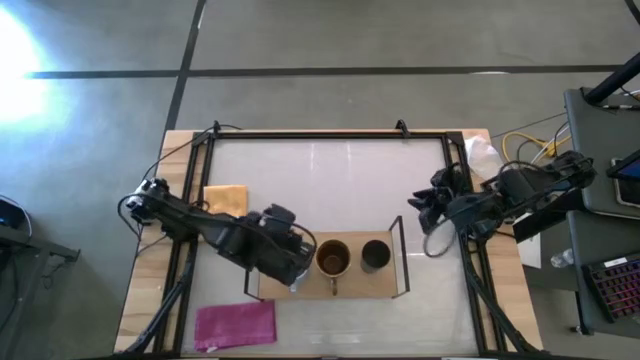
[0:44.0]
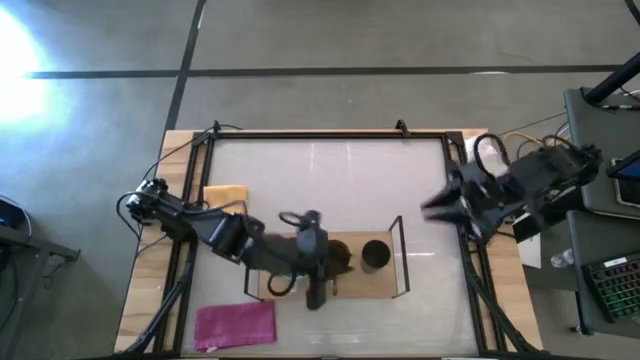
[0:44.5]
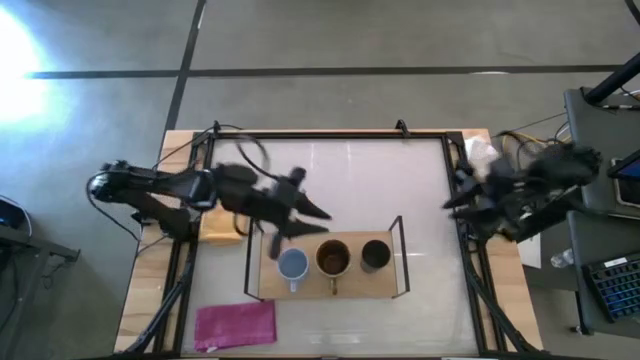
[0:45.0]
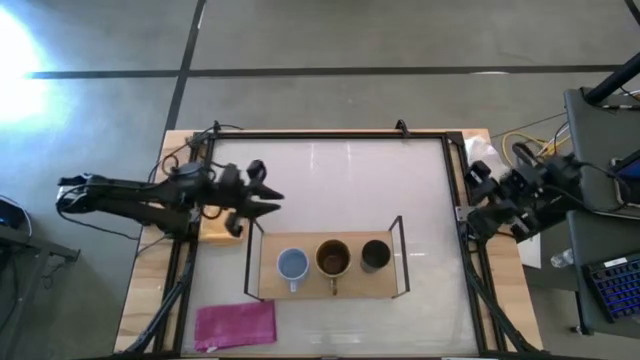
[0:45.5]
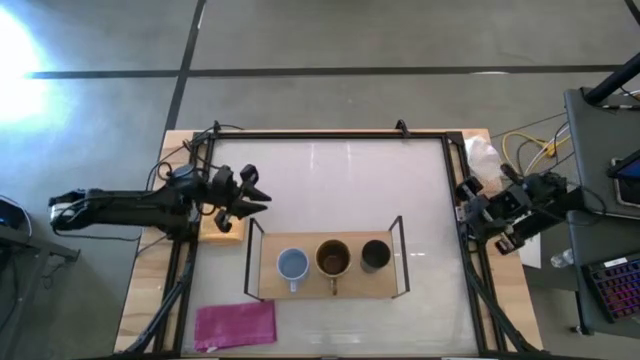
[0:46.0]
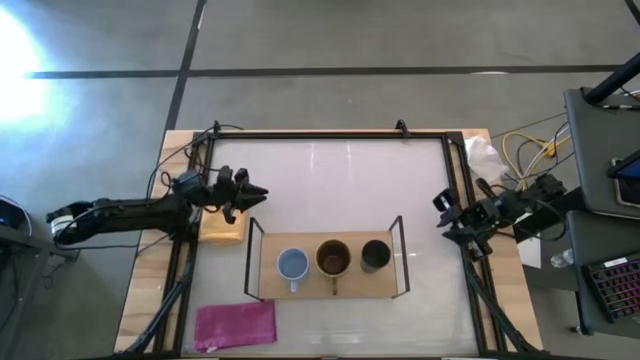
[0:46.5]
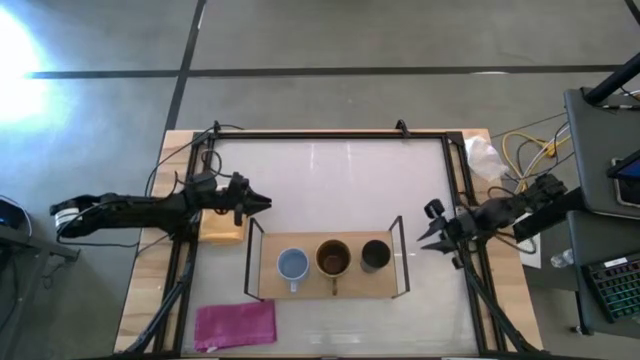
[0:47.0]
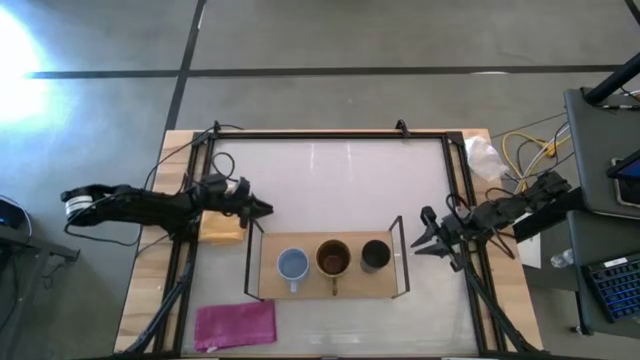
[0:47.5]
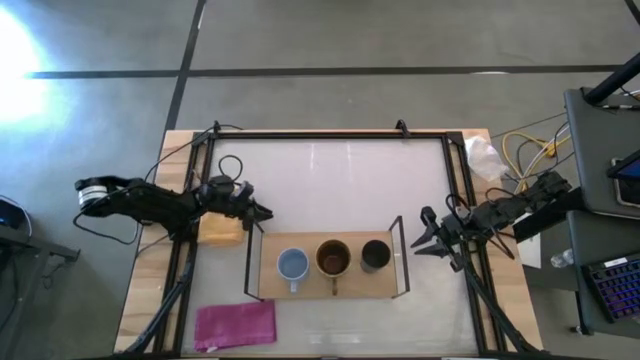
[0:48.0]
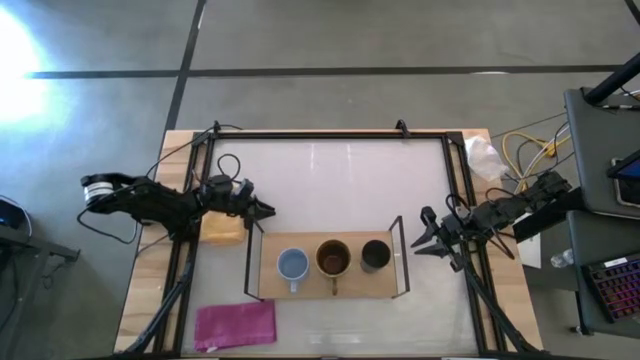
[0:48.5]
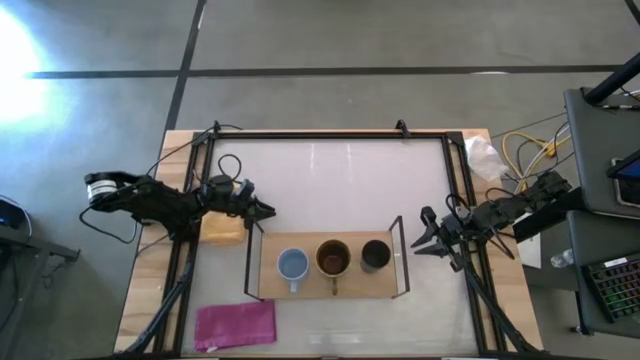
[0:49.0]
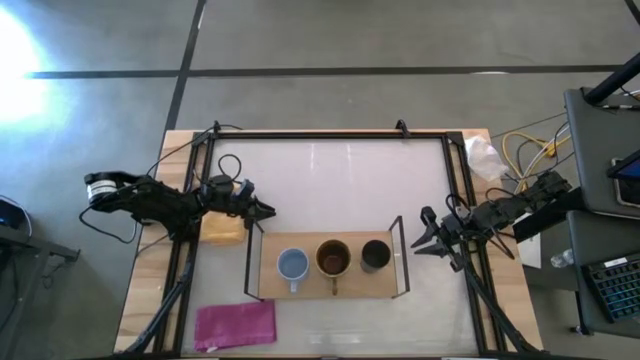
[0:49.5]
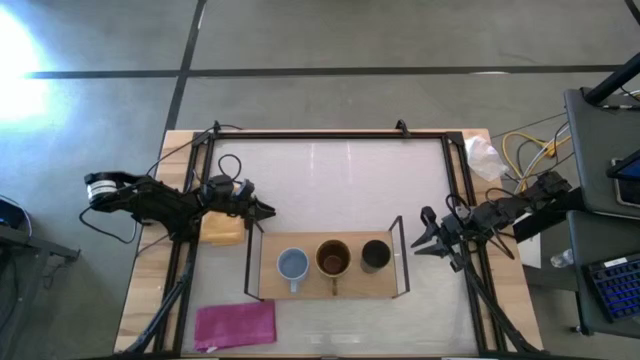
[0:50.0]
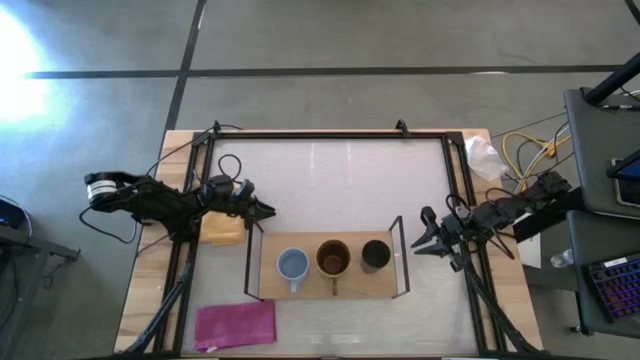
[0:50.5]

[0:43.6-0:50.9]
Task: Stack small to large cups/mugs on shelf
Return to Home Position

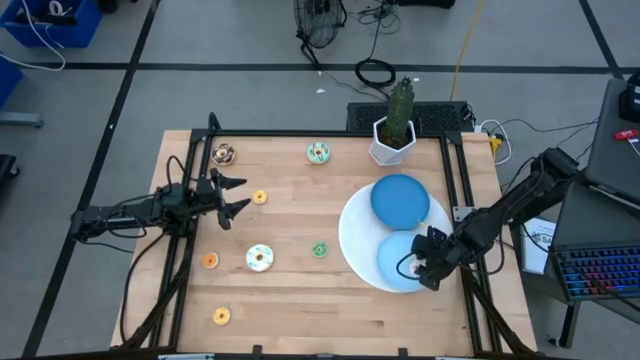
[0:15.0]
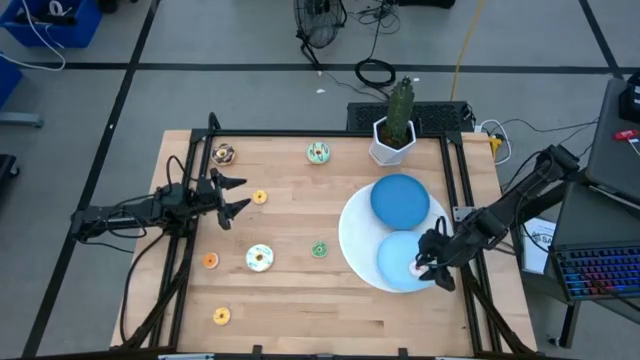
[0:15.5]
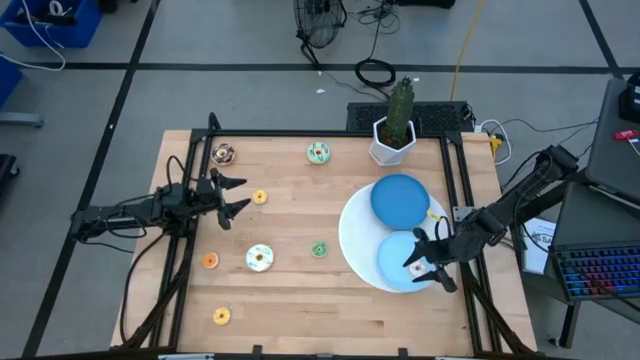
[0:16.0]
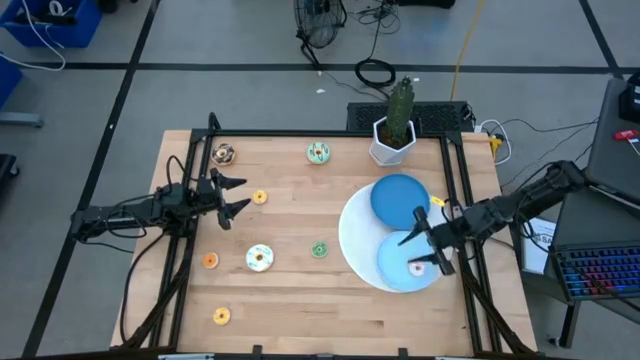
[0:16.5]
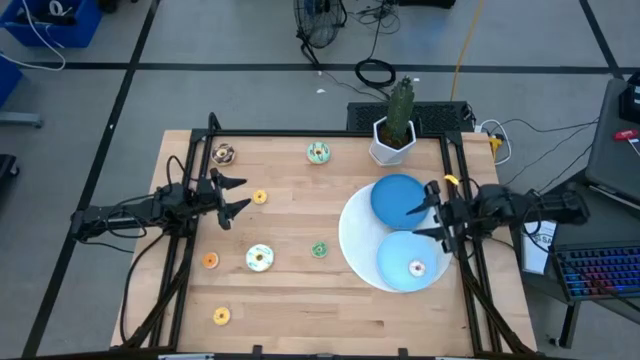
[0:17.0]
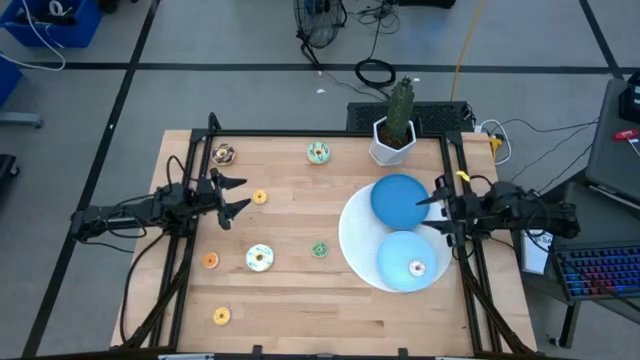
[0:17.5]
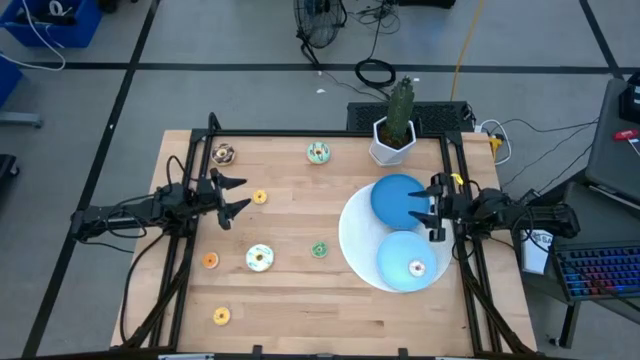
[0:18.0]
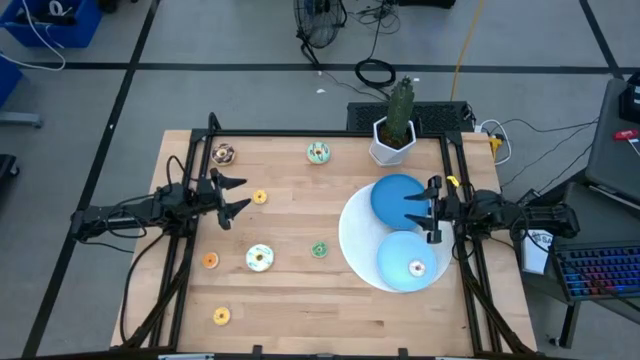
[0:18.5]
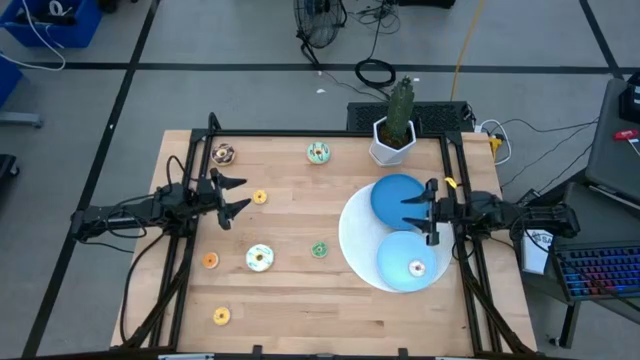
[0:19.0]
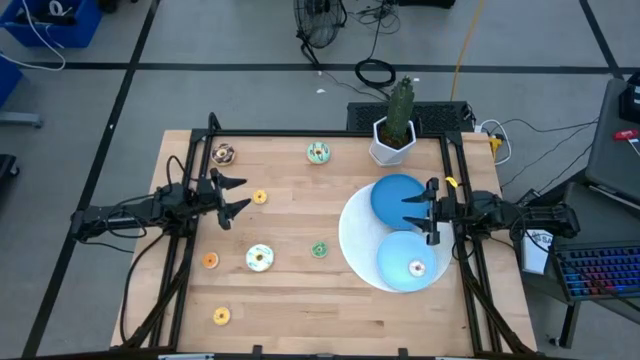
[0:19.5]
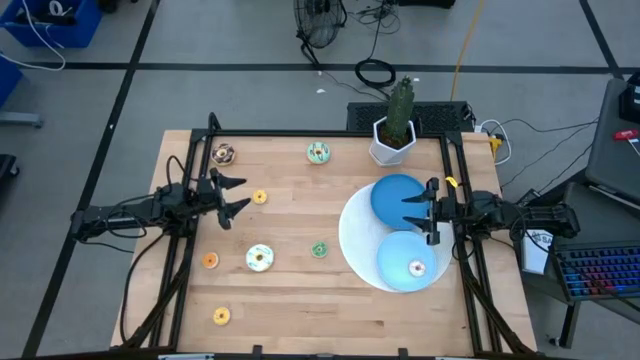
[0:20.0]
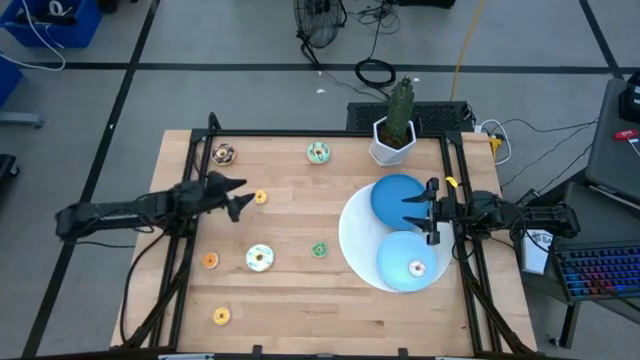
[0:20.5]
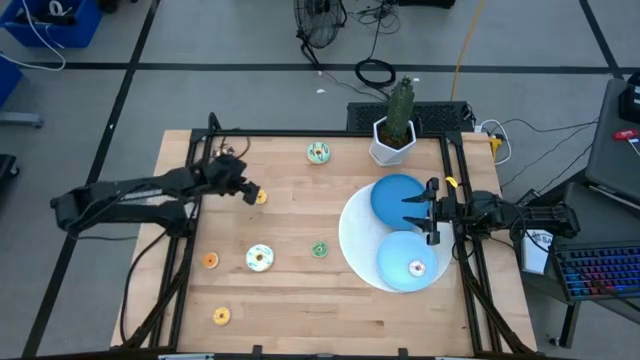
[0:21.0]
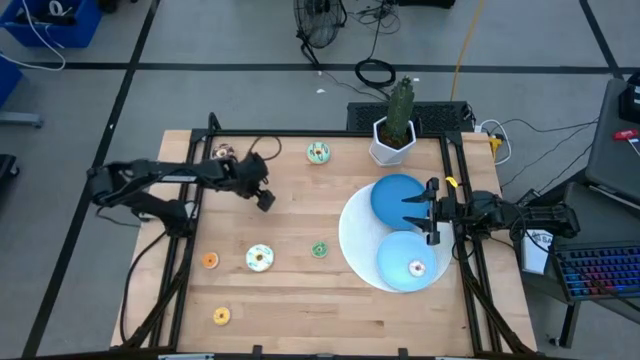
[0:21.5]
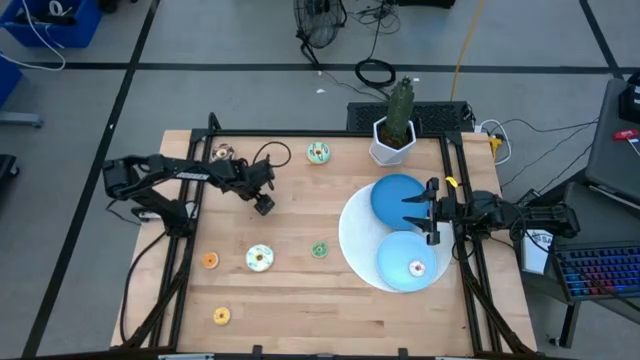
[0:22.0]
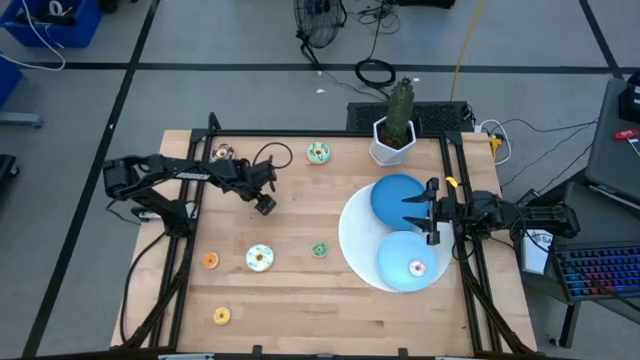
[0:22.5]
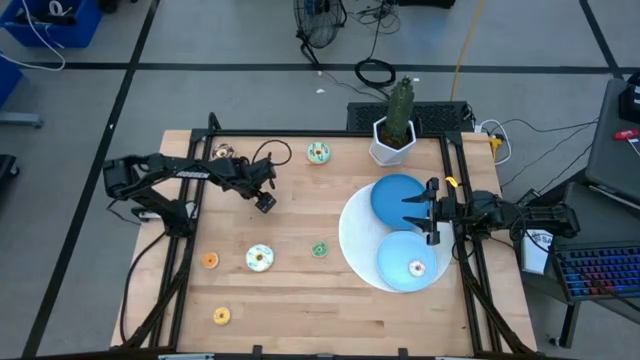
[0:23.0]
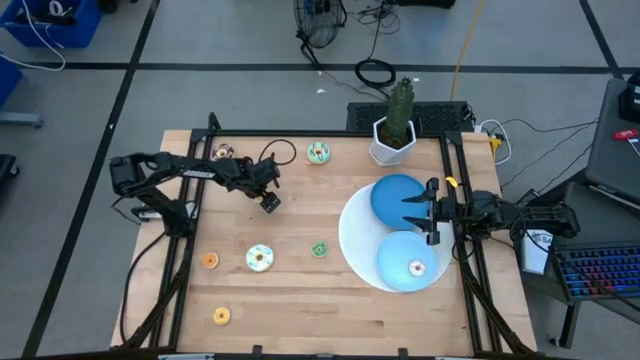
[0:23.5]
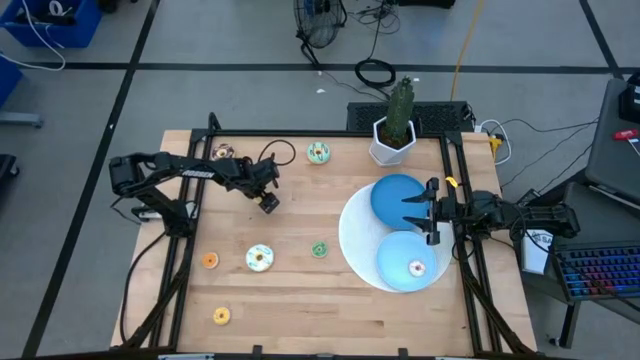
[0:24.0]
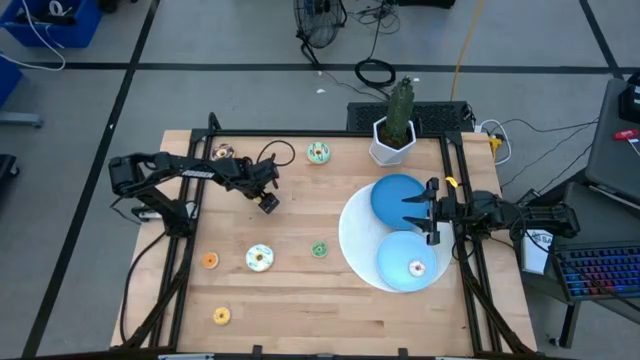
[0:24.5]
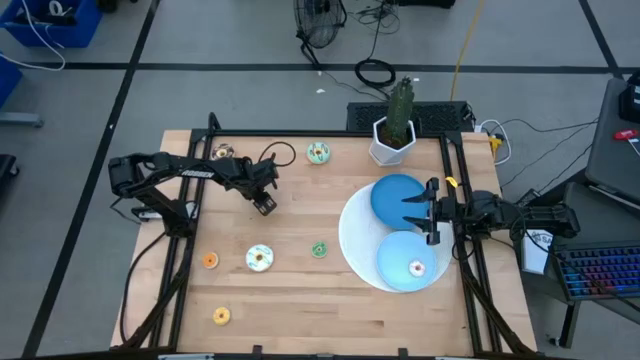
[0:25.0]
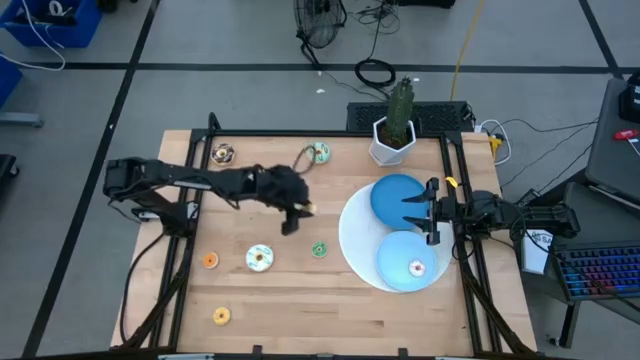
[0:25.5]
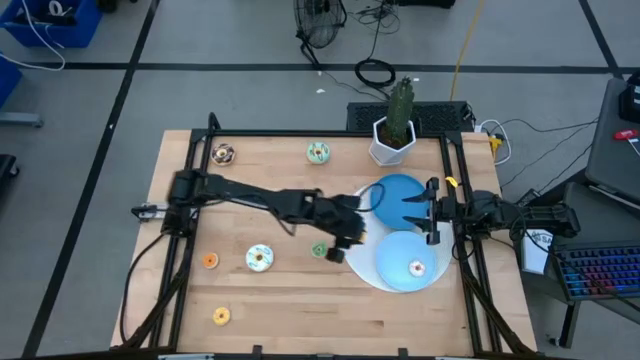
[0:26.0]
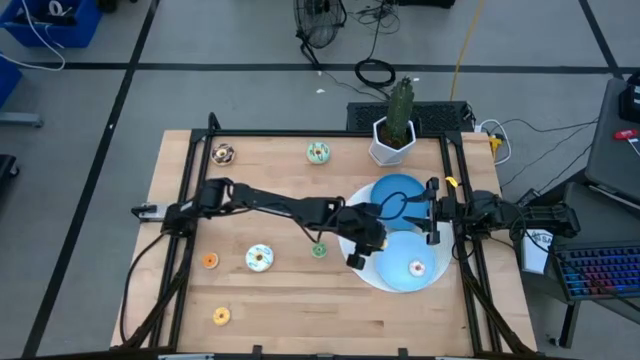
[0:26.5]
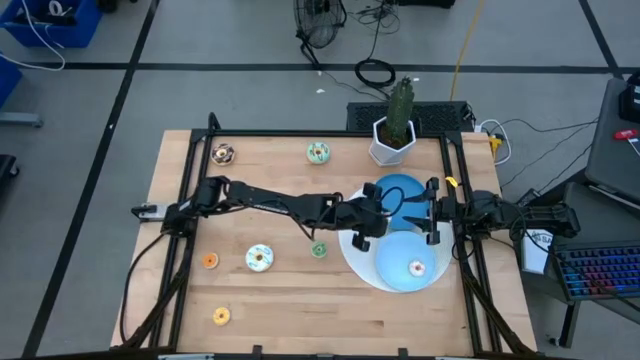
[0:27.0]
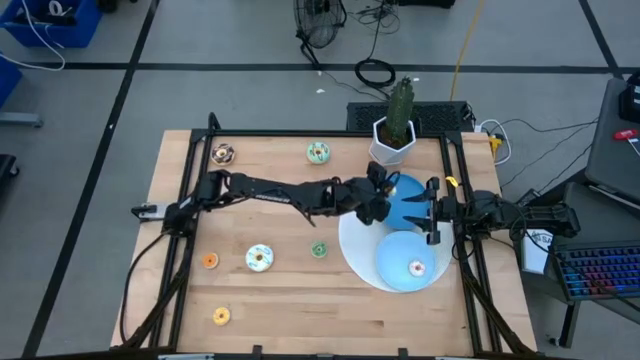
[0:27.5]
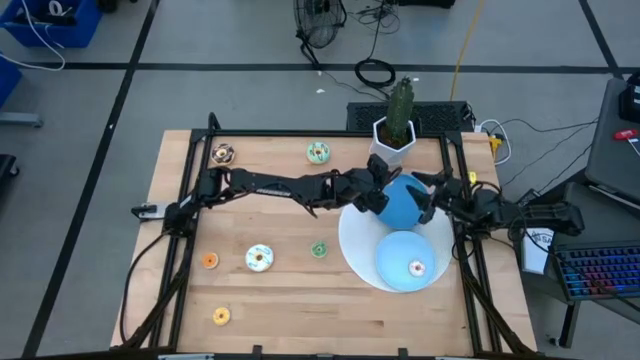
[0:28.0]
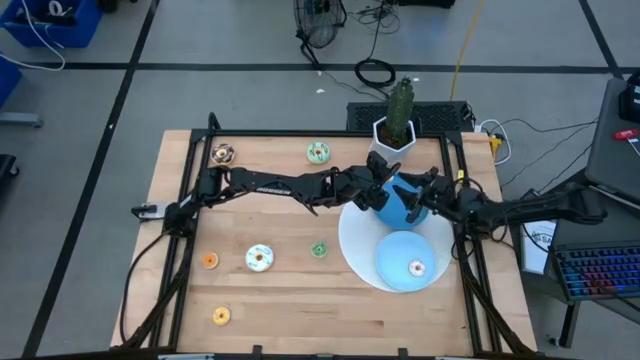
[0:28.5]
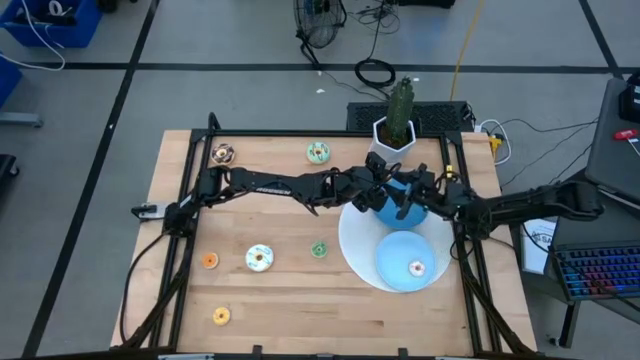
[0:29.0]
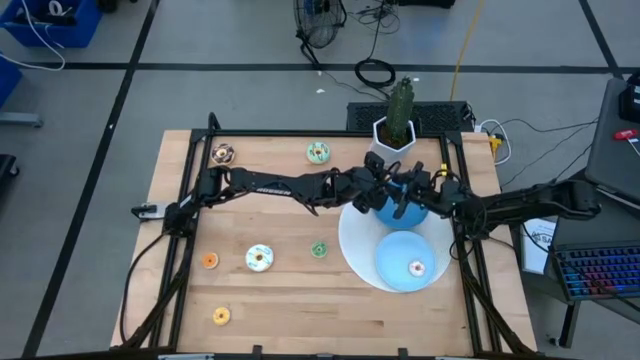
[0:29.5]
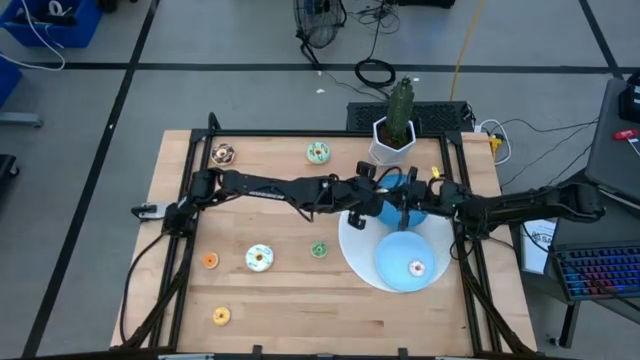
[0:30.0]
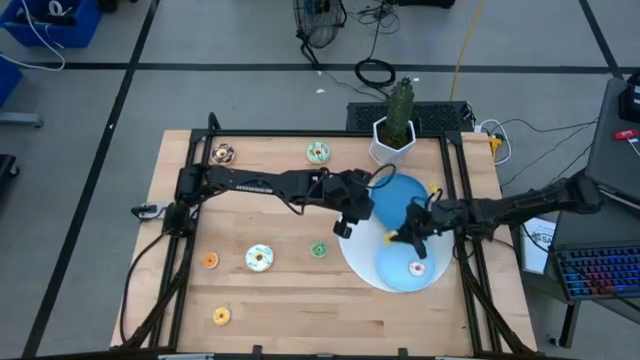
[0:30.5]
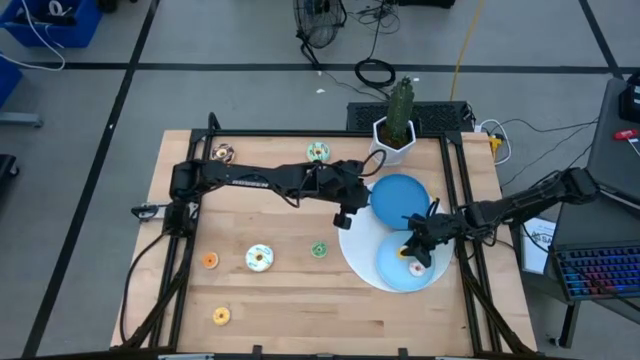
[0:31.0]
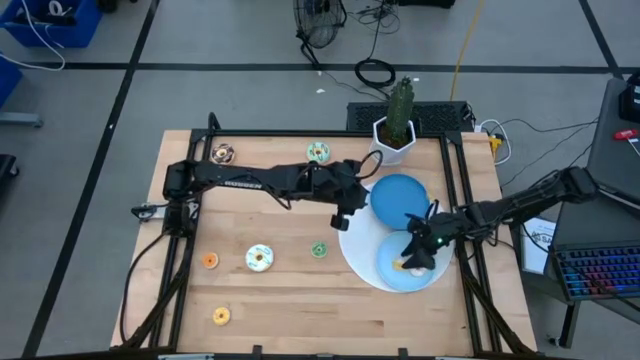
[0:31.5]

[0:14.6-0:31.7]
Task: Pick & Place donuts
Put the small yellow donut on the light blue plate
